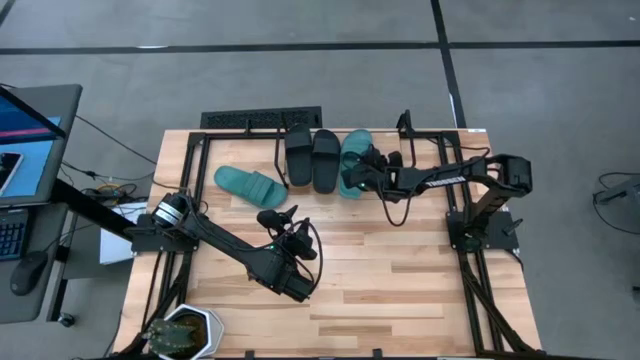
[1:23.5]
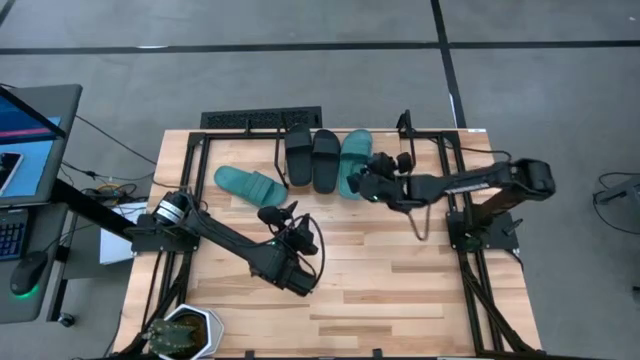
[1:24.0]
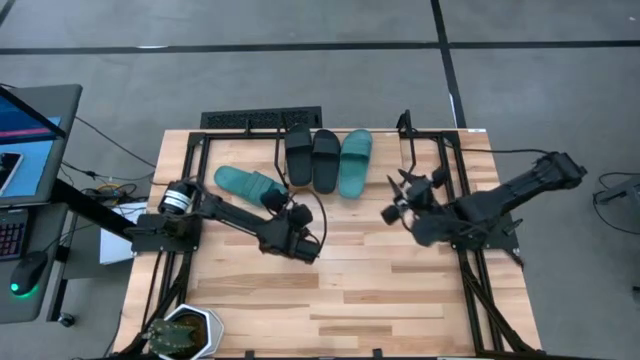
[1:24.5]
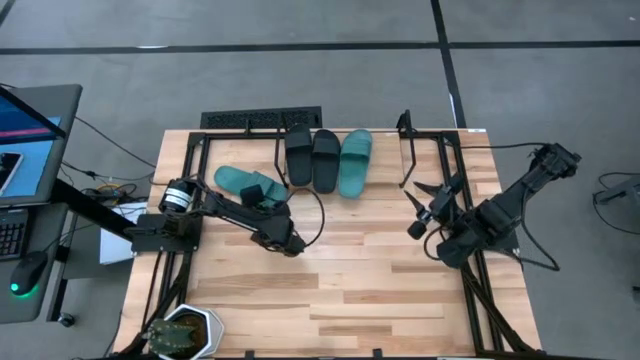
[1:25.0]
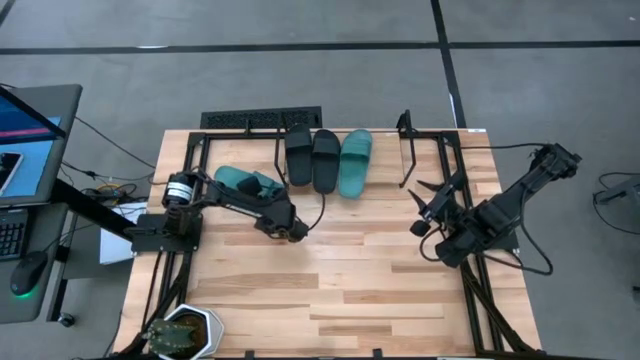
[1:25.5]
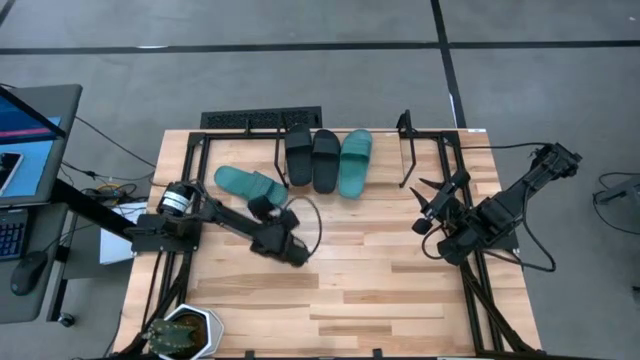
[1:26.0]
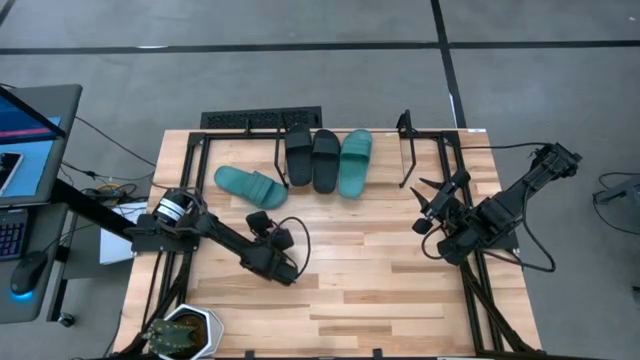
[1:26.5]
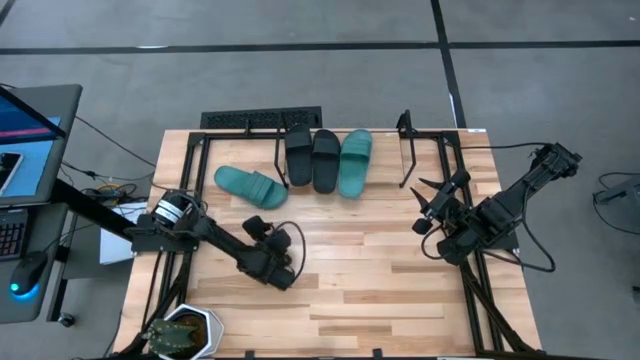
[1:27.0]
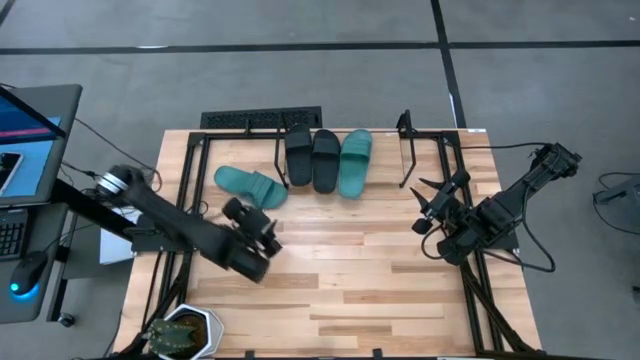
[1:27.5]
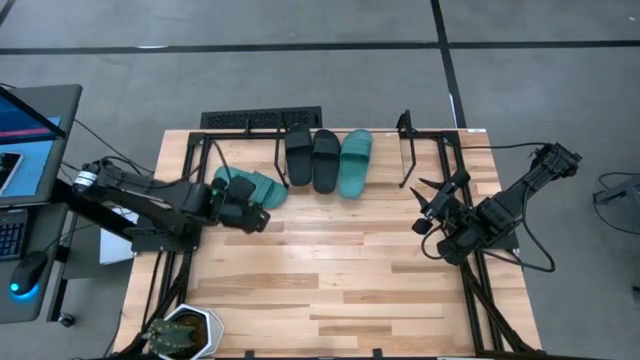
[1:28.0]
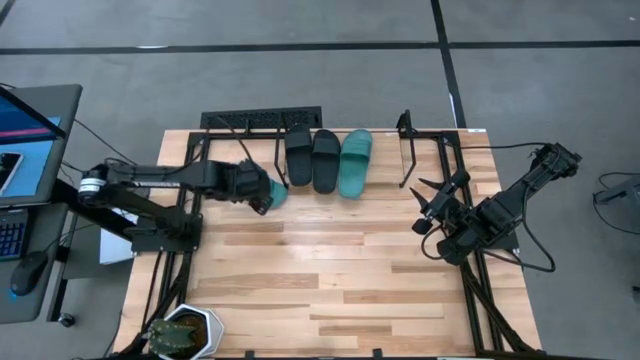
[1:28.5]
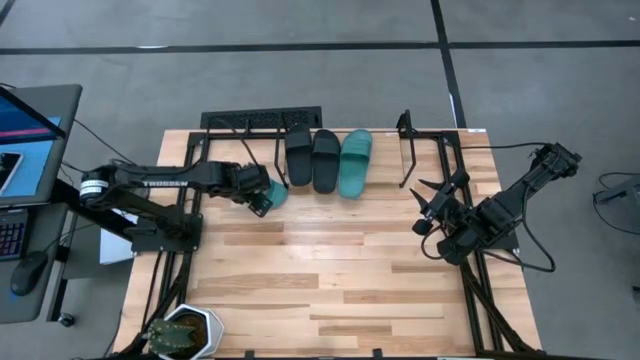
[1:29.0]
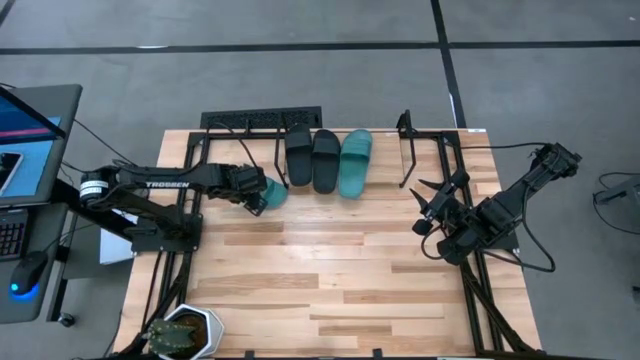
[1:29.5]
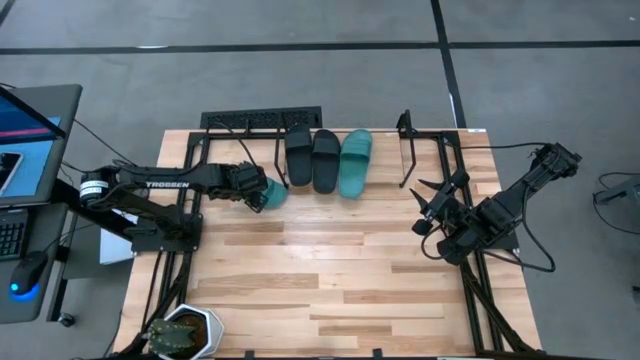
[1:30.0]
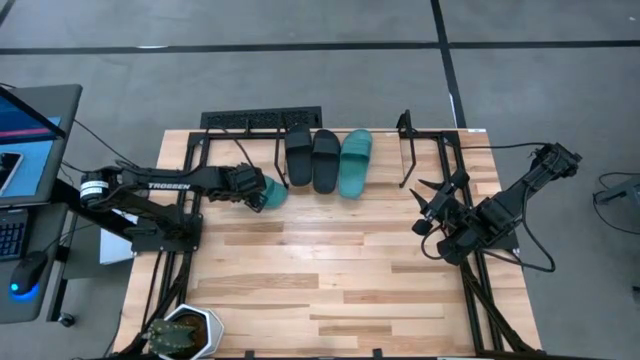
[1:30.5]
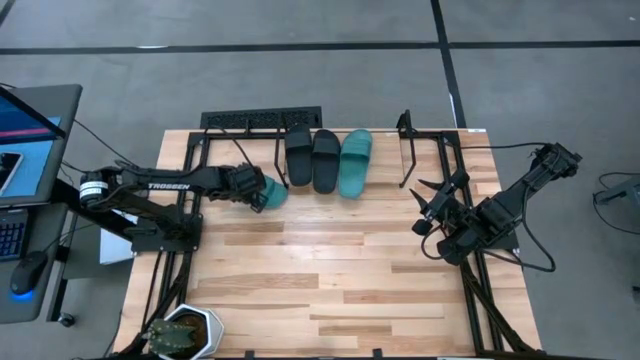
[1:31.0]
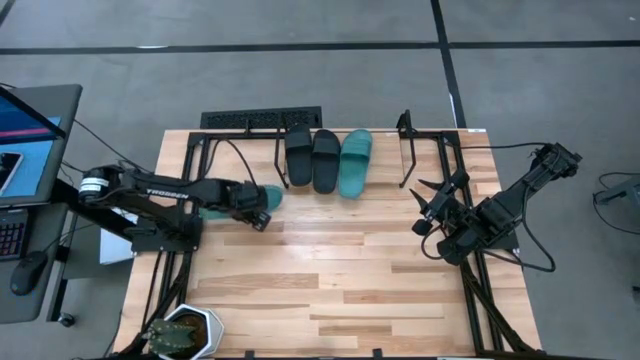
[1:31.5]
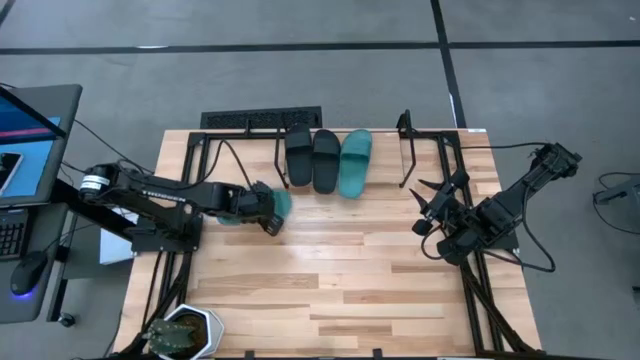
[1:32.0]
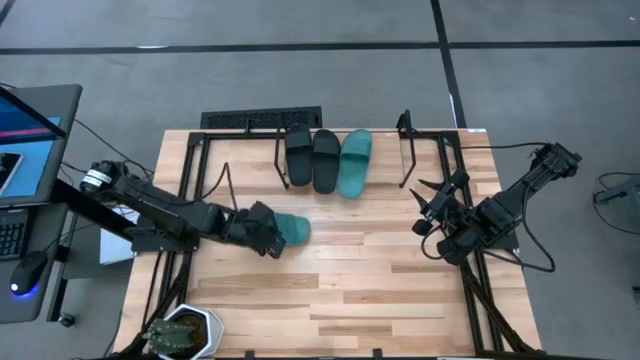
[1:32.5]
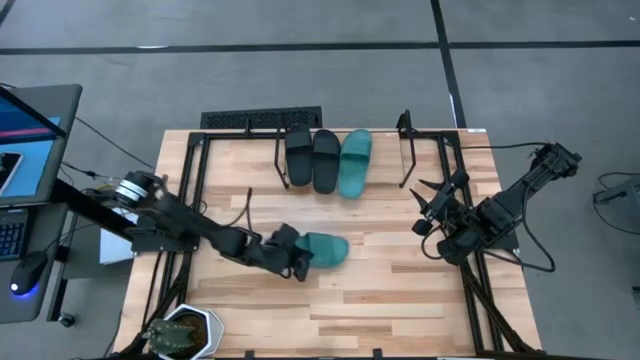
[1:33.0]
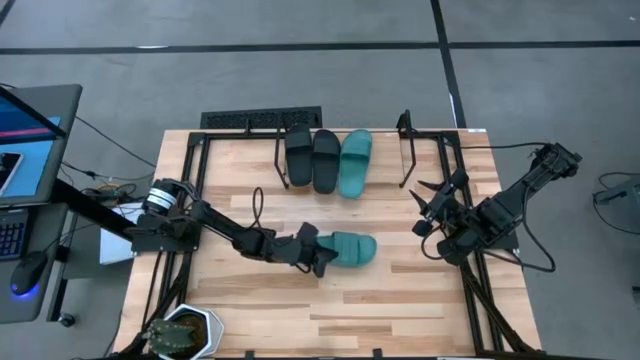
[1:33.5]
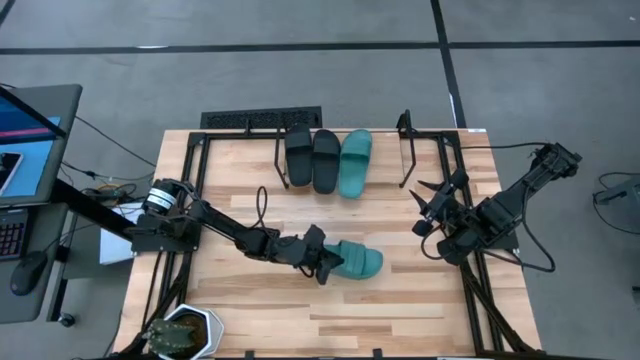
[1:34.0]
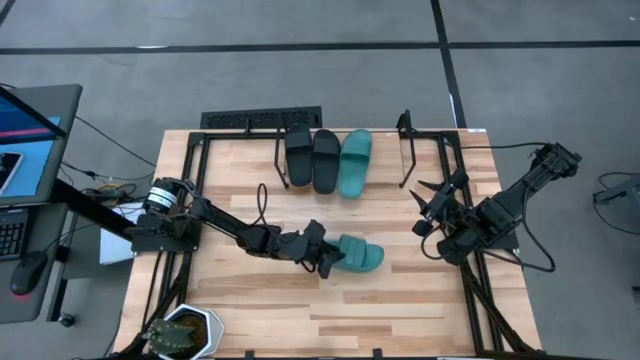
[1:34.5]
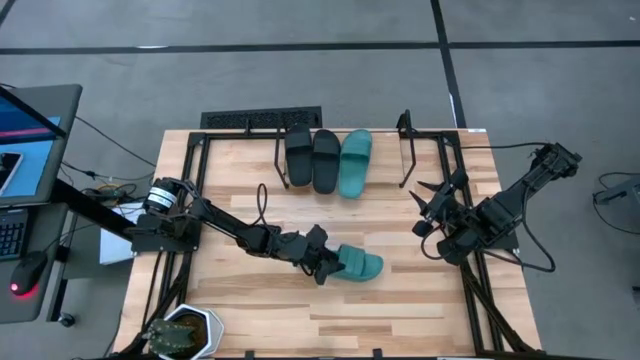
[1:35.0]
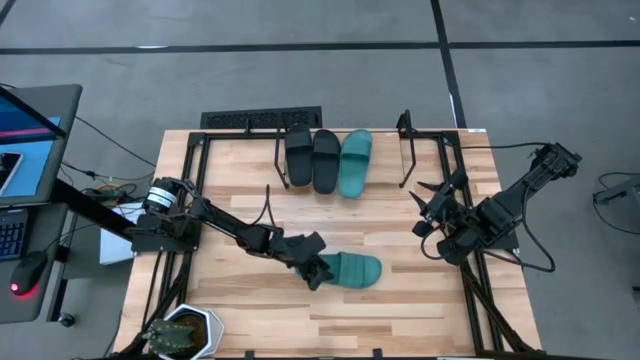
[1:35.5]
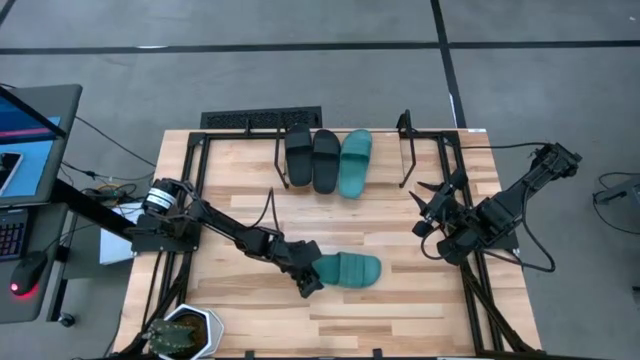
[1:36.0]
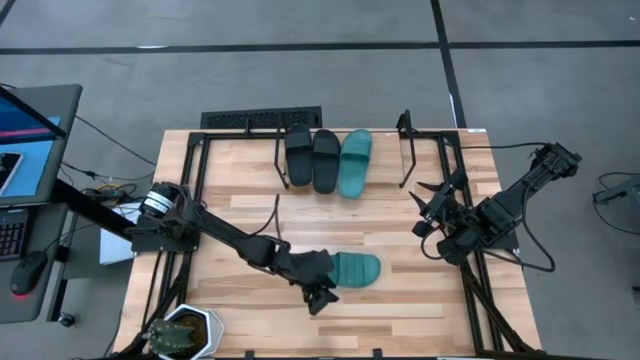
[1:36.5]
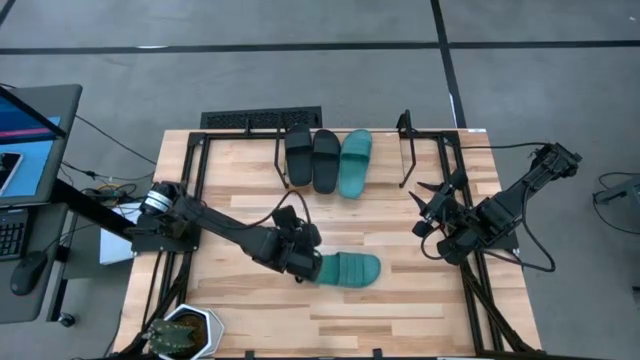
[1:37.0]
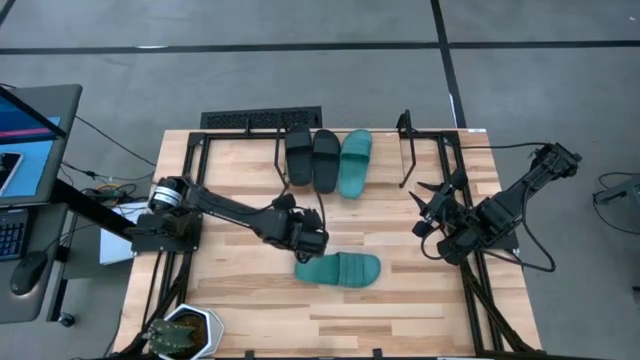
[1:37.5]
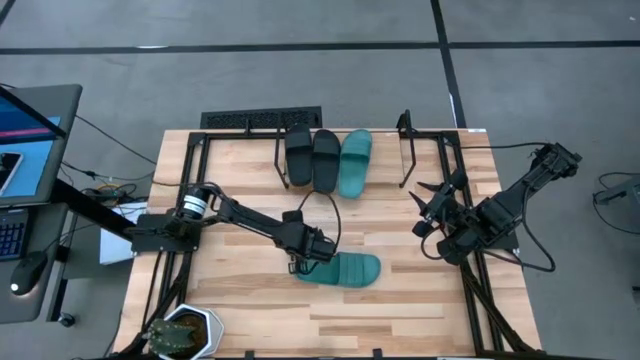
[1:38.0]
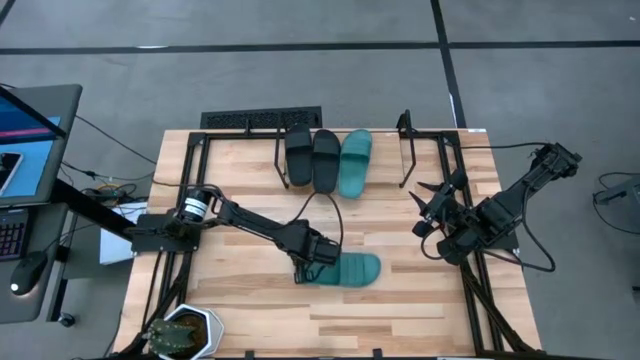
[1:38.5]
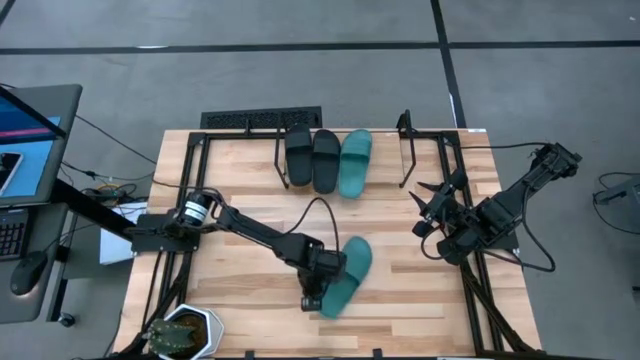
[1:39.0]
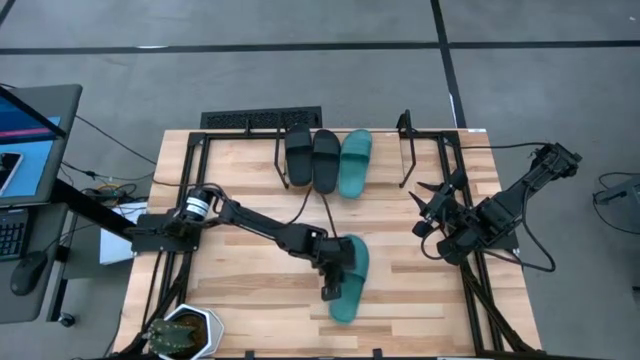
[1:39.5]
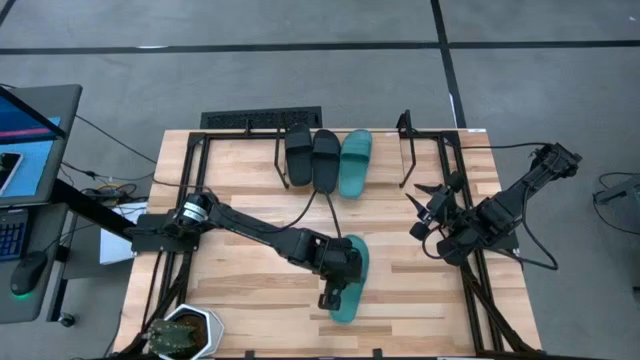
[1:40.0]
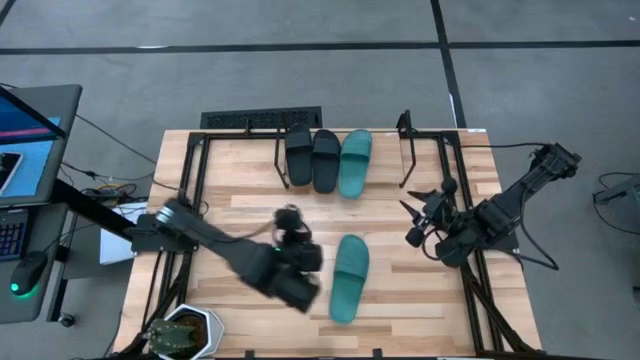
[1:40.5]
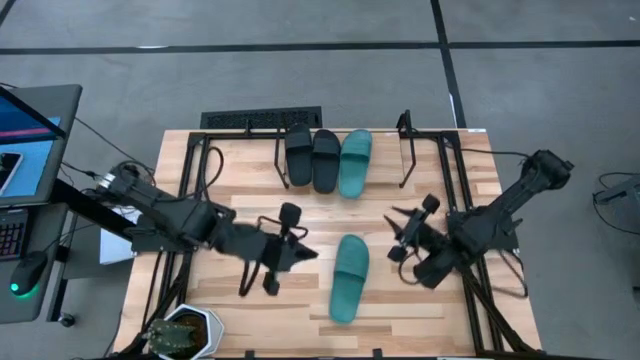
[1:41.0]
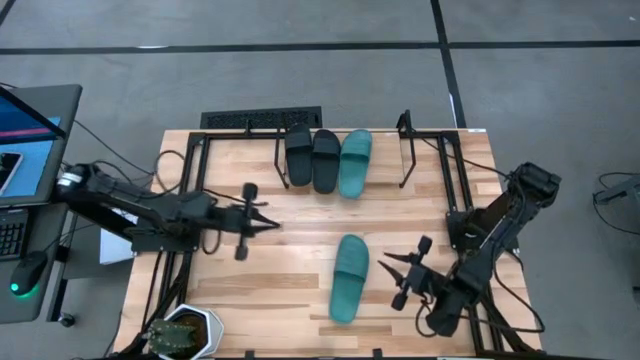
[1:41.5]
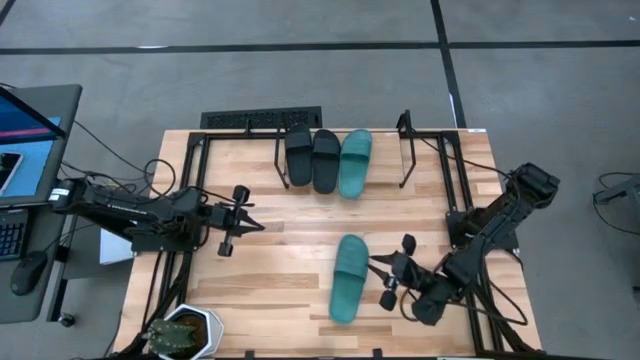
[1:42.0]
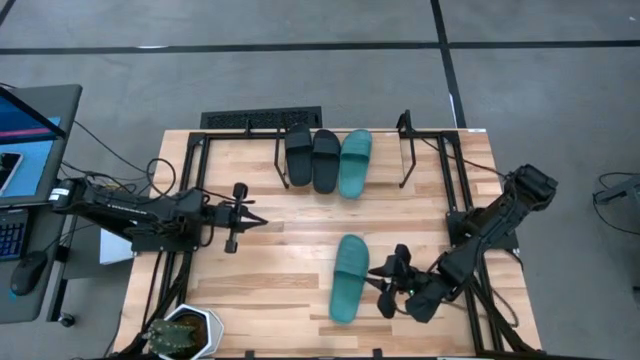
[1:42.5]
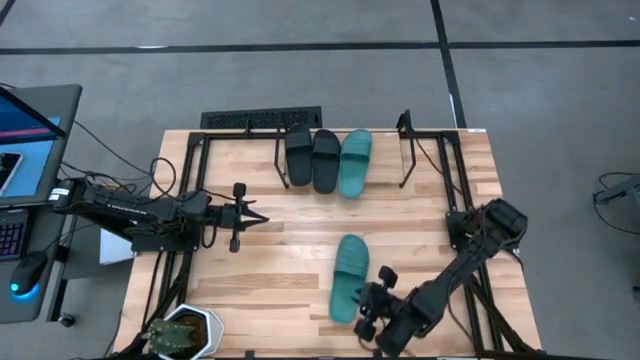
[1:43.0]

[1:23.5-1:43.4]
Task: Pick and place slides into the shelf
Put the dark green slipper on the shelf
